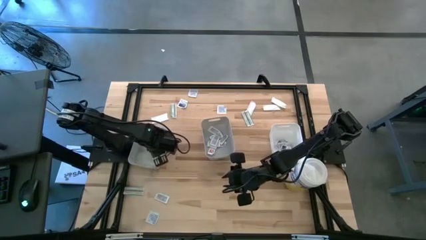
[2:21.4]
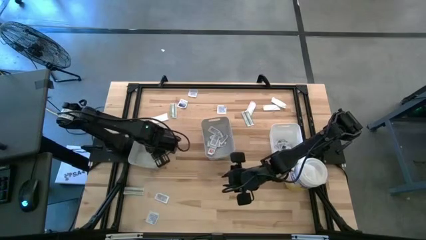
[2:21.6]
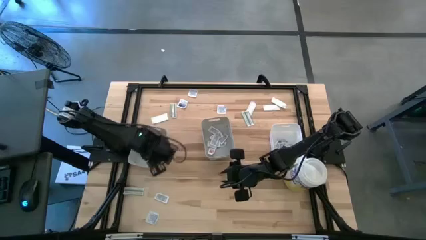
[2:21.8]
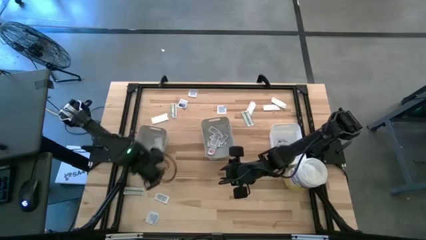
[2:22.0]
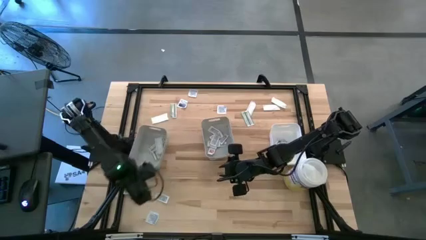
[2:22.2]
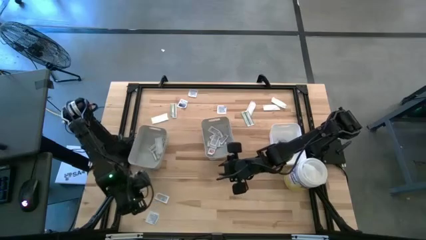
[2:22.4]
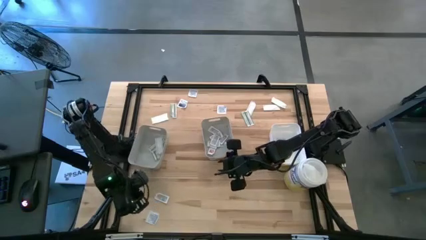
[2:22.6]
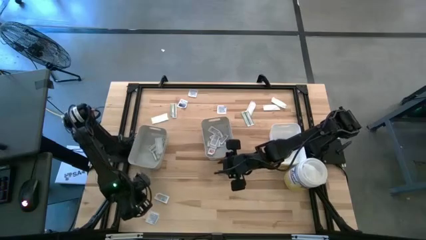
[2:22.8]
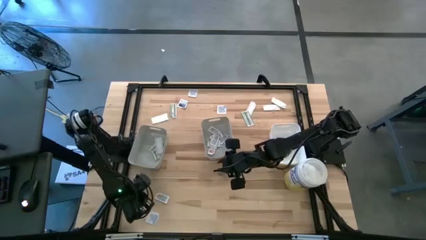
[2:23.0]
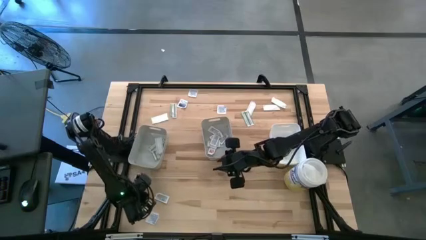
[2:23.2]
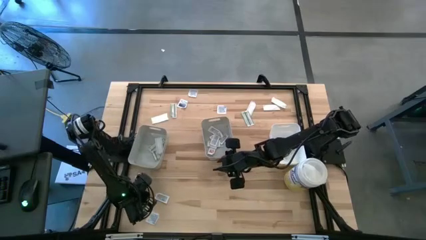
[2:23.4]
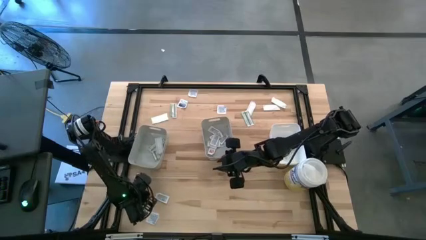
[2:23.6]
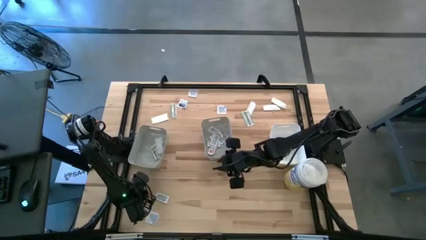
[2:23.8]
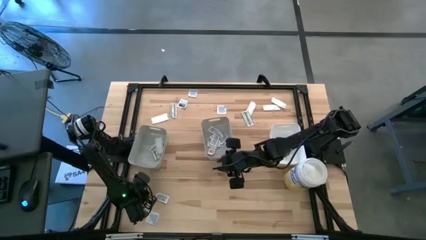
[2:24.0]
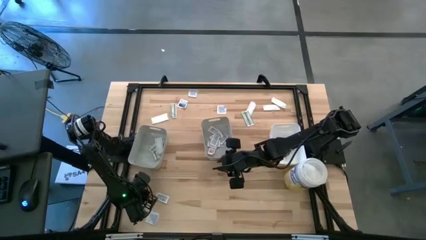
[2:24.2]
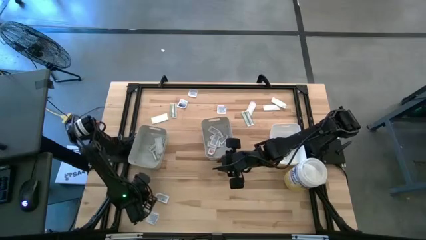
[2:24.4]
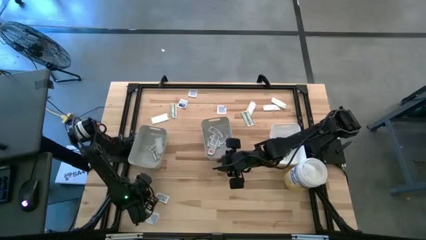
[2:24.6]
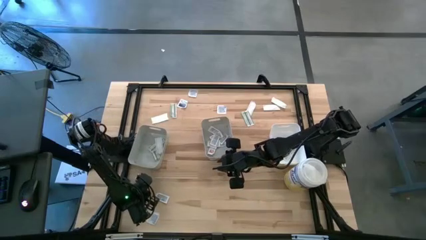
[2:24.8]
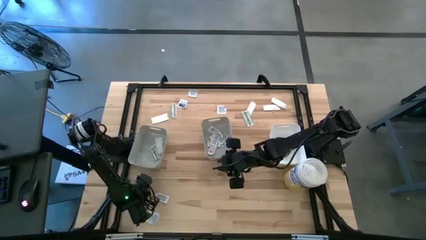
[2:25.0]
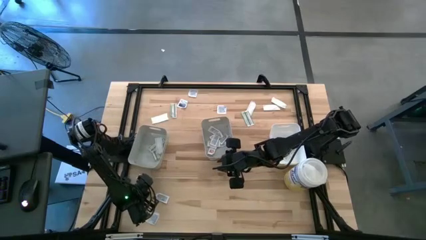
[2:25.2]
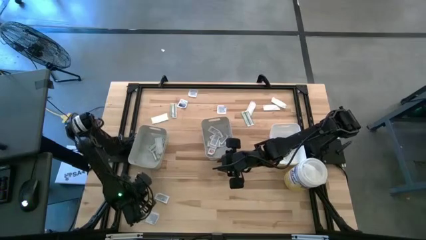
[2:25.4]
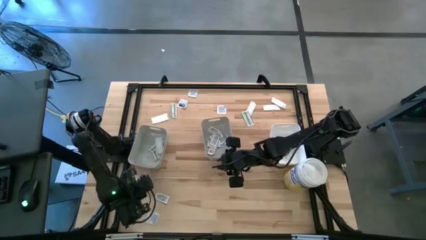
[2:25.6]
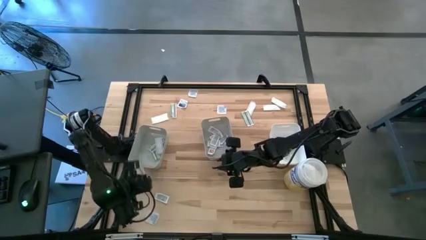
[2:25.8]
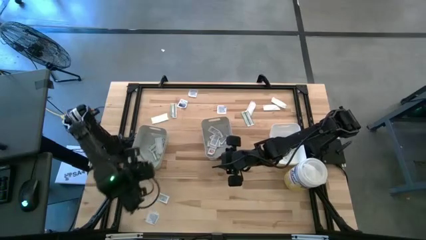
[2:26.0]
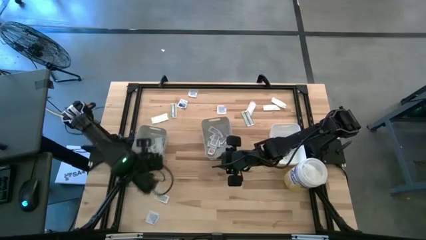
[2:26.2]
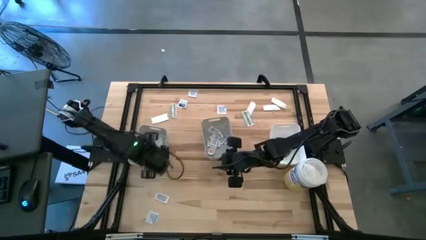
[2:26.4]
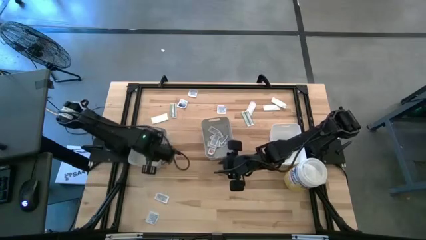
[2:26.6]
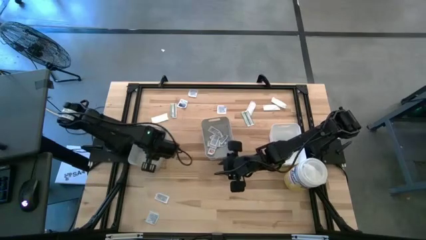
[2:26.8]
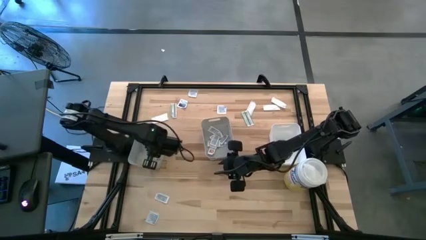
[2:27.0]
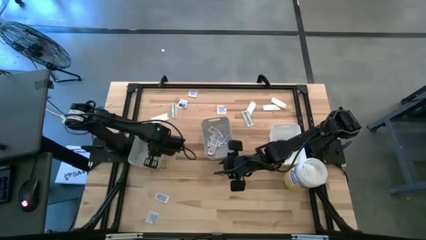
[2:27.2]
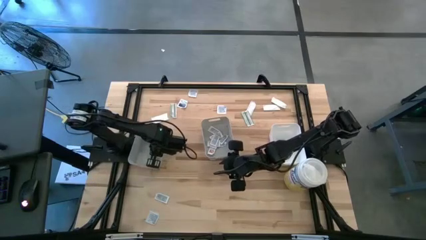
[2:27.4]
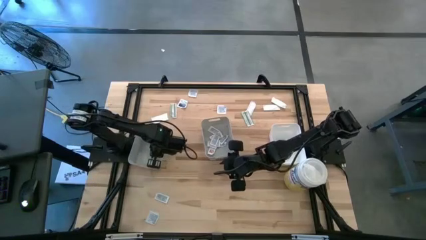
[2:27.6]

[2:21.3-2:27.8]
Task: Pick & Place First Aid Supplies
Put the bandage pack into the left gray bin

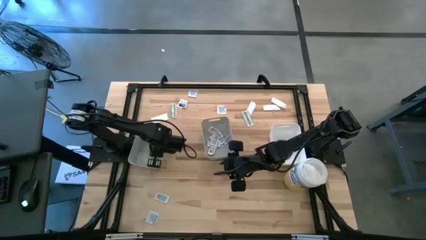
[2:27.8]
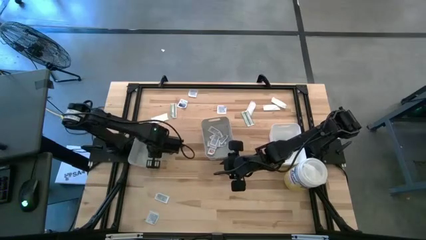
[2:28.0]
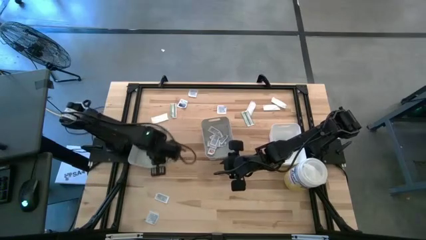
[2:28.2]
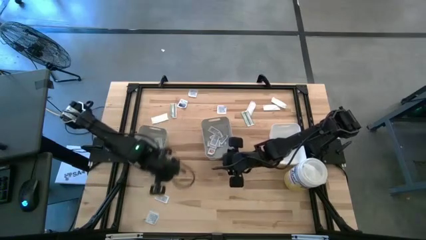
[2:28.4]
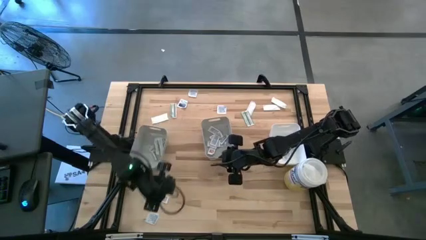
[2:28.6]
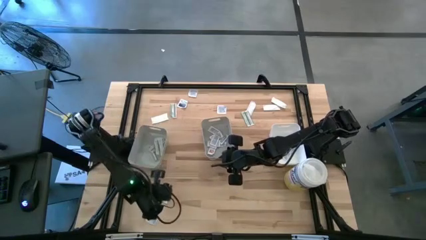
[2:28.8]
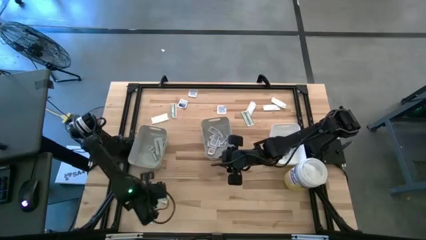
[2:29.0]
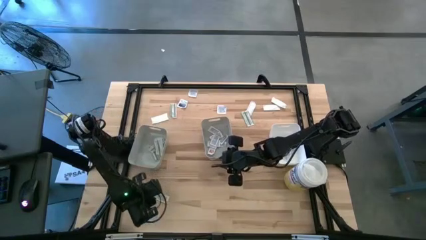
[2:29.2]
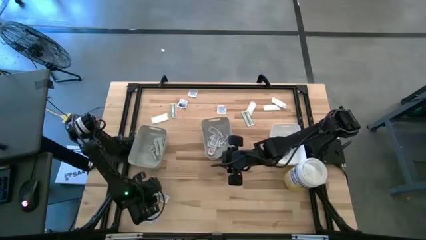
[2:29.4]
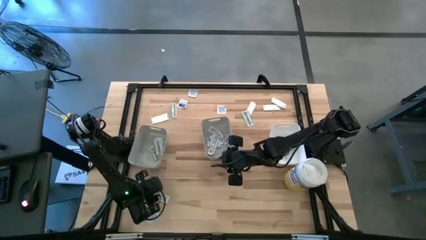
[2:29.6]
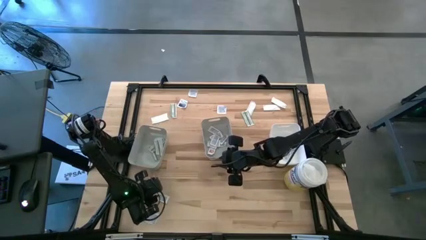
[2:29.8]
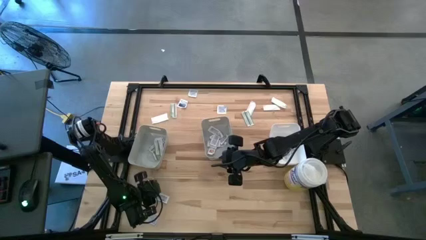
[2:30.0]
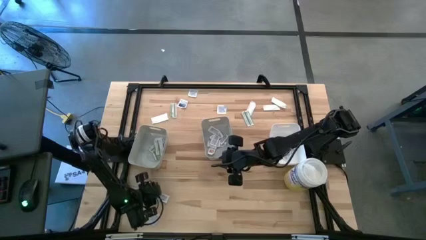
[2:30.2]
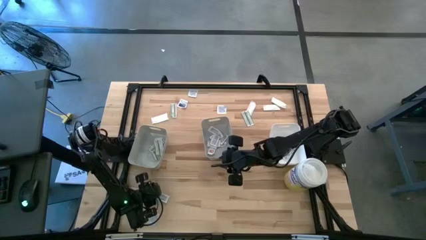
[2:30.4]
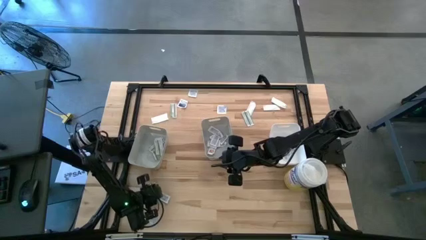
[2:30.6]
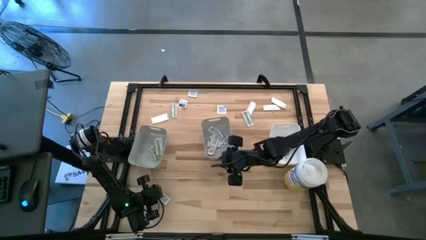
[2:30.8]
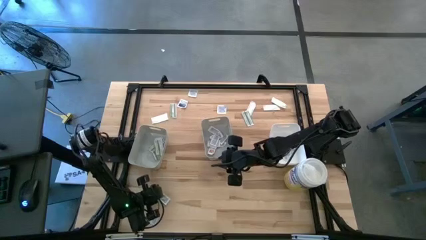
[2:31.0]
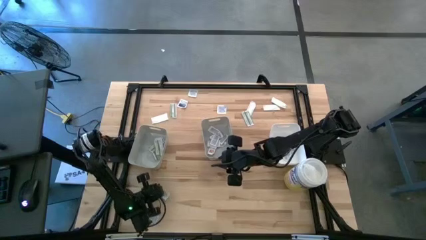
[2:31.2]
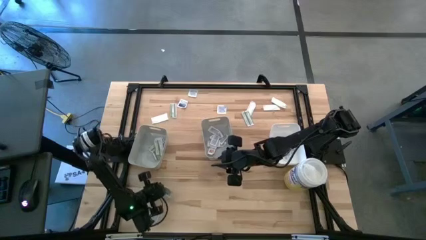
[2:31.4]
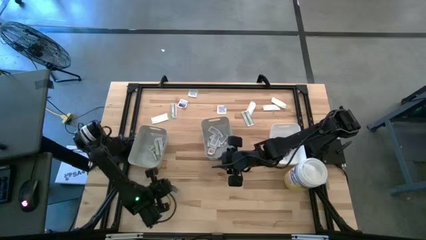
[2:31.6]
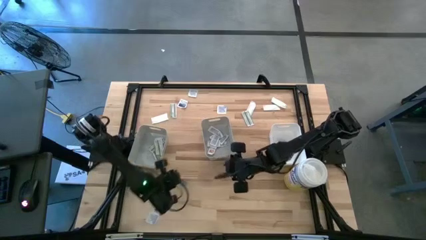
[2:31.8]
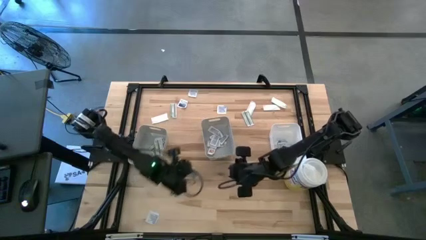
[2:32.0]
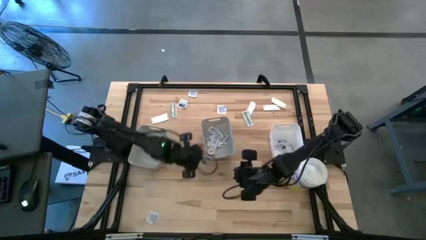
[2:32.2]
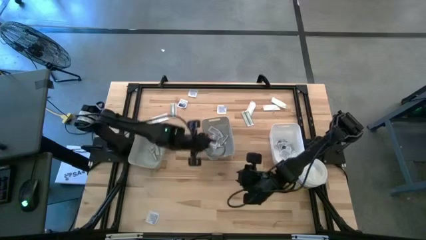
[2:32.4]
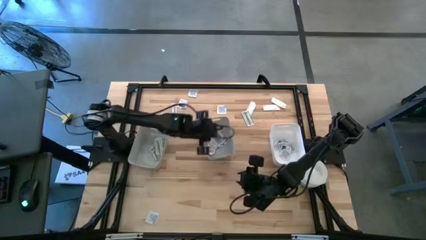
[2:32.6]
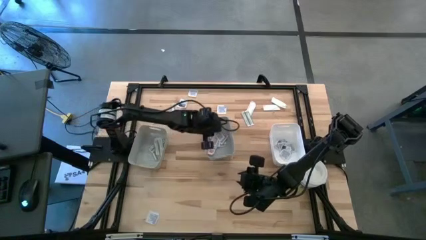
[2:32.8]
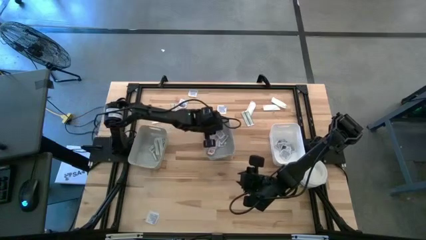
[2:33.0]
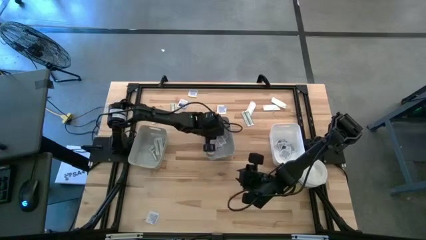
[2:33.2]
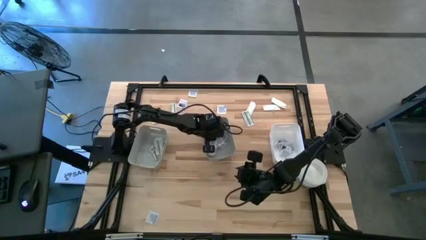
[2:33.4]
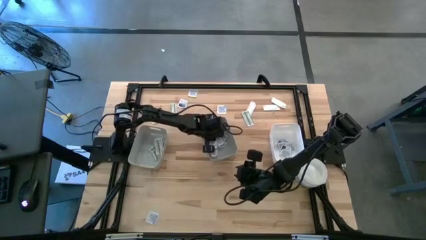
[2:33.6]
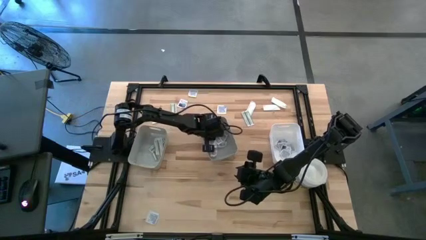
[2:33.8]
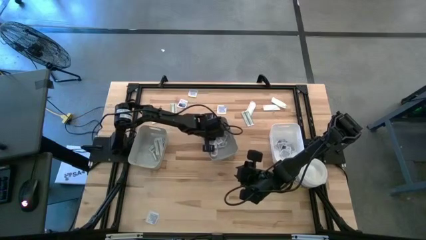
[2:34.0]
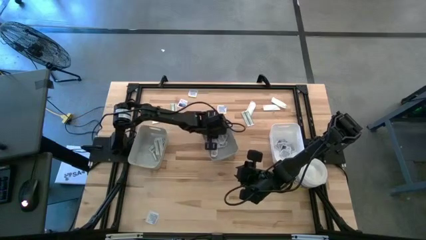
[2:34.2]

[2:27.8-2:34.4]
Put the ointment pack into the right gray bin

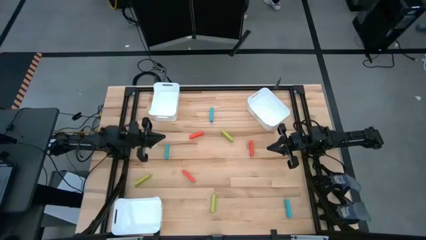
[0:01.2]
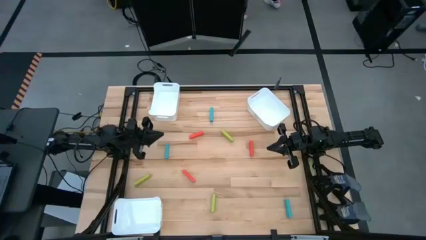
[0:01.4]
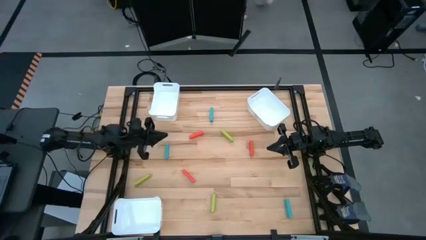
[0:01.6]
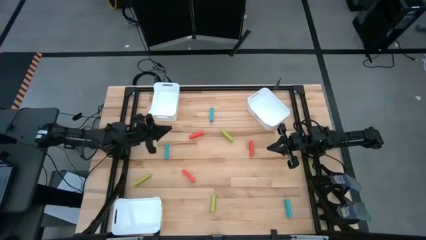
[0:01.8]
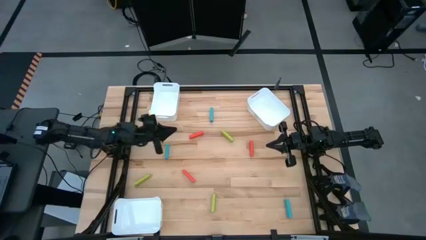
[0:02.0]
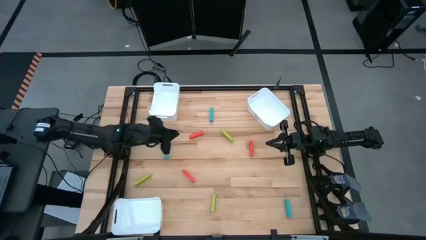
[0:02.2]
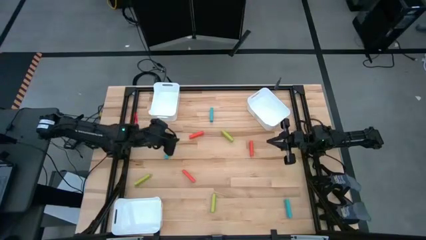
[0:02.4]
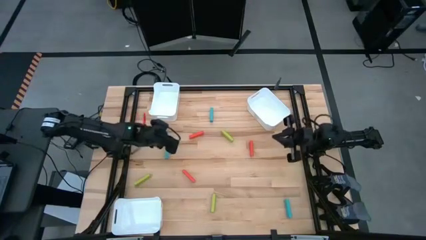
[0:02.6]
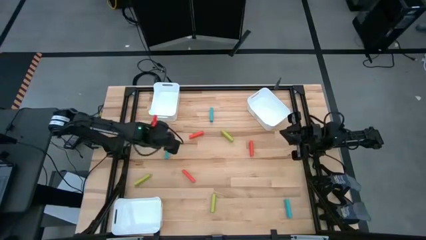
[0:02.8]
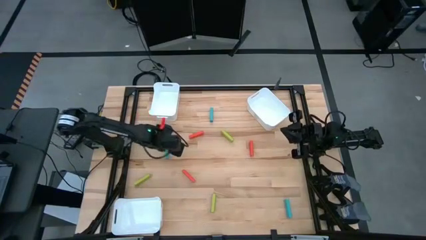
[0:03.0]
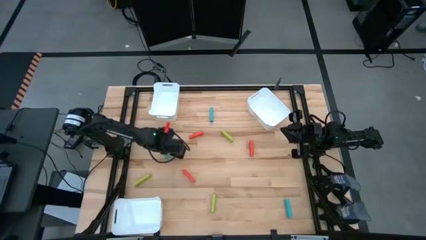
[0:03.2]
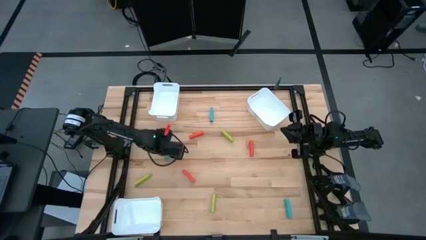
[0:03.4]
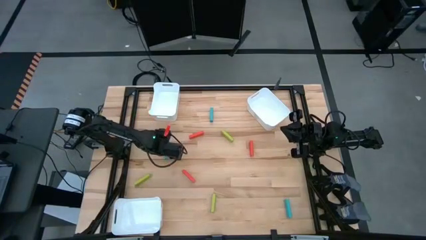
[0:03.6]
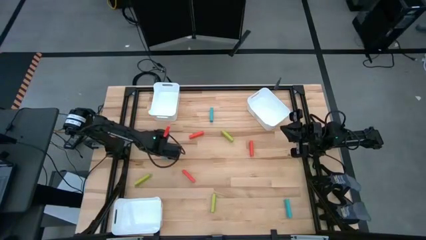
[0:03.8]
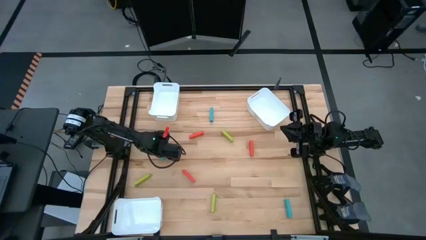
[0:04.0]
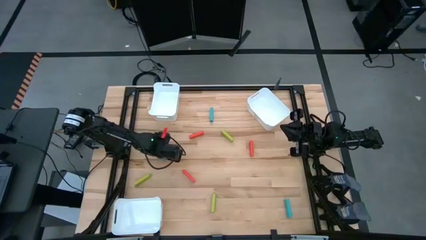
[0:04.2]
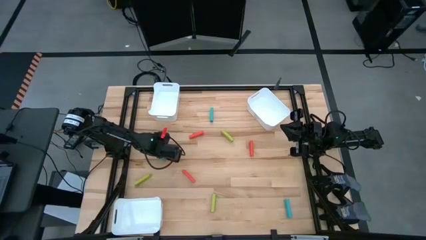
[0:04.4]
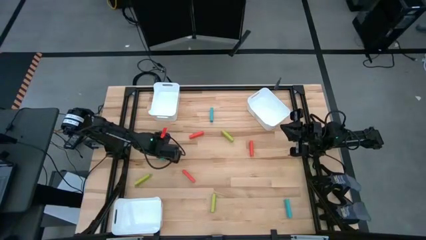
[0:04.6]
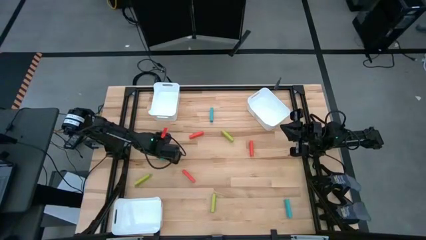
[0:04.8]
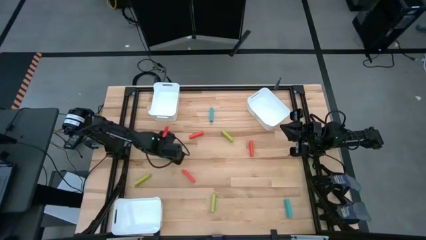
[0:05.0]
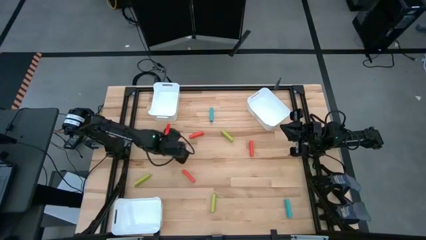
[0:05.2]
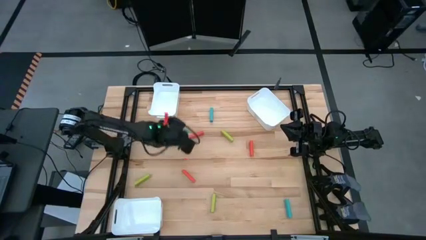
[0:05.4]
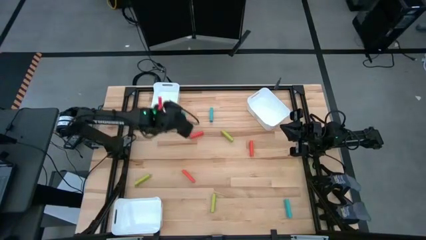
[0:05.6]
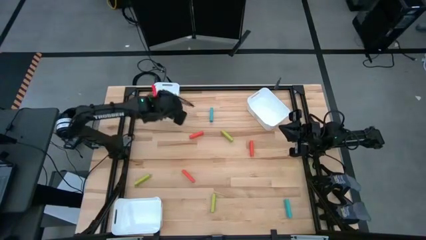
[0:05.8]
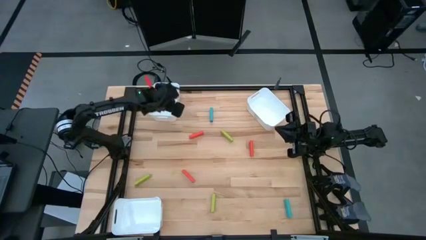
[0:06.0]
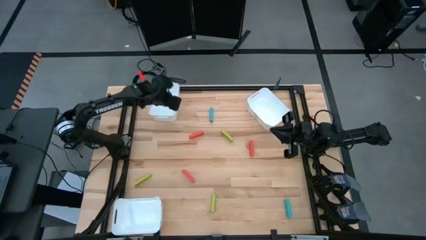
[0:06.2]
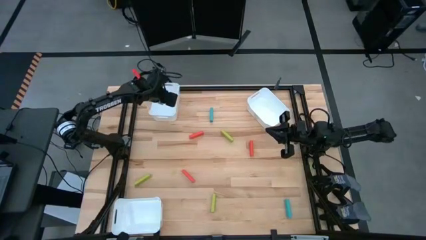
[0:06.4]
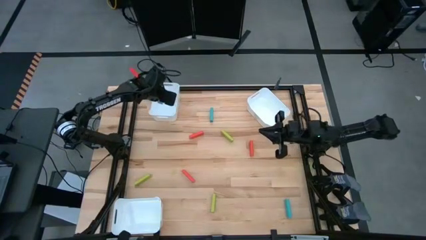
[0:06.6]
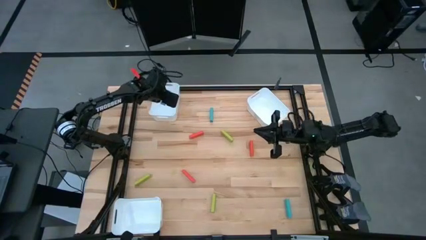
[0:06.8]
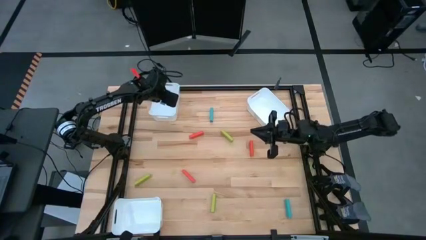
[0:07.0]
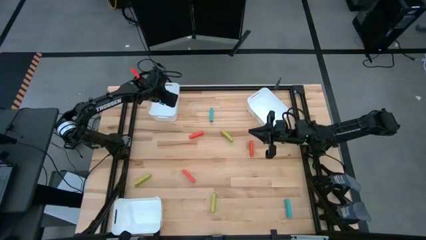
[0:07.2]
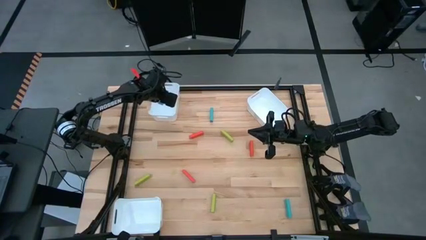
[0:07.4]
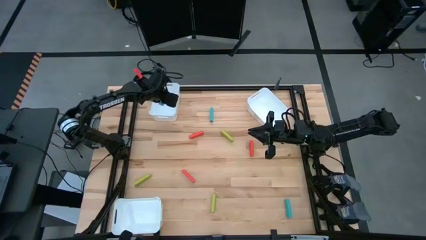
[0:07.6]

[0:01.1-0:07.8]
Task: Sort blocks
Put the middle left blue block into the top left white bin
